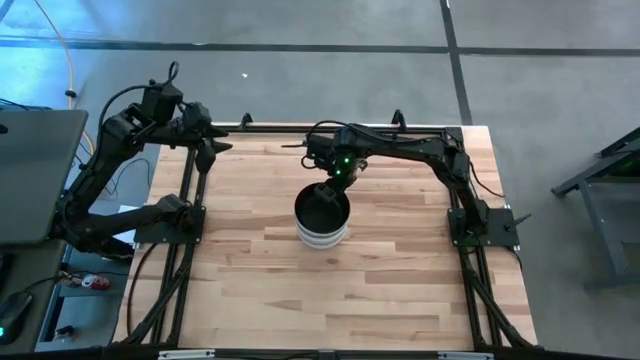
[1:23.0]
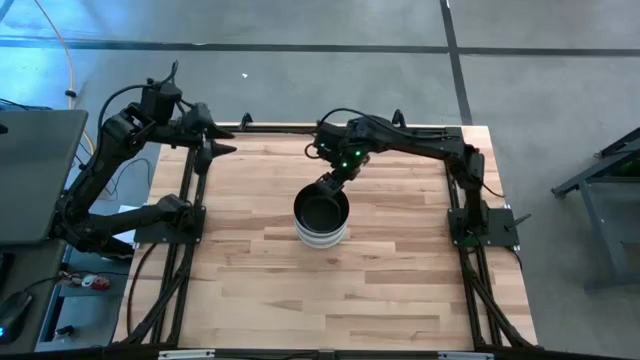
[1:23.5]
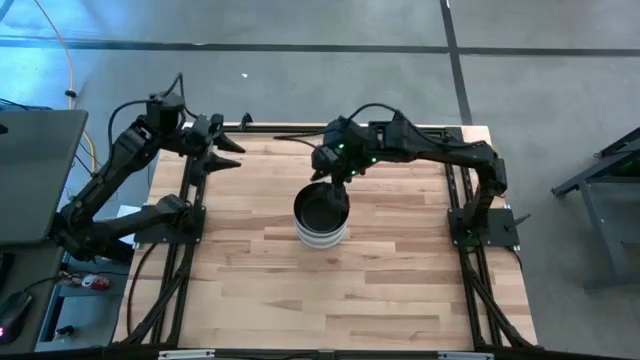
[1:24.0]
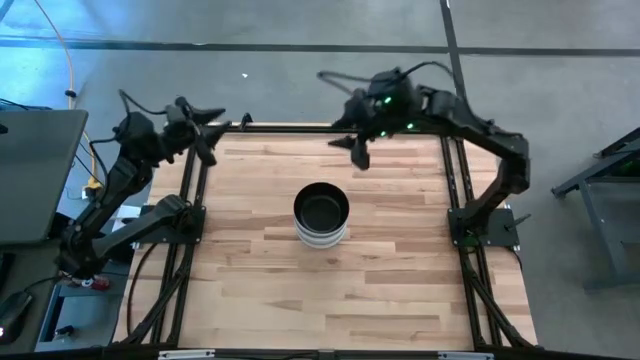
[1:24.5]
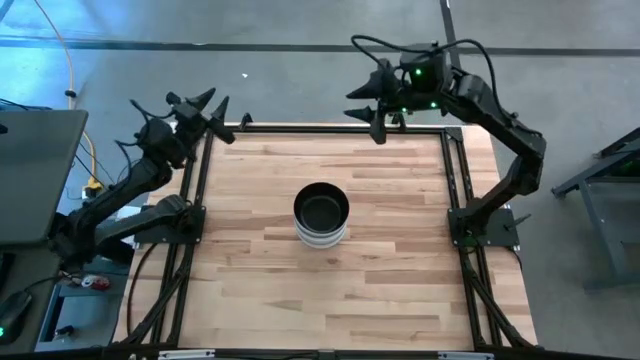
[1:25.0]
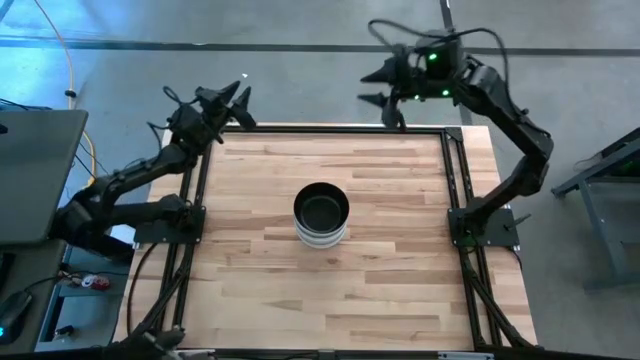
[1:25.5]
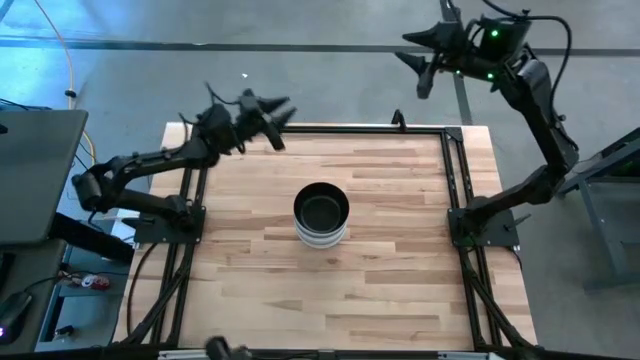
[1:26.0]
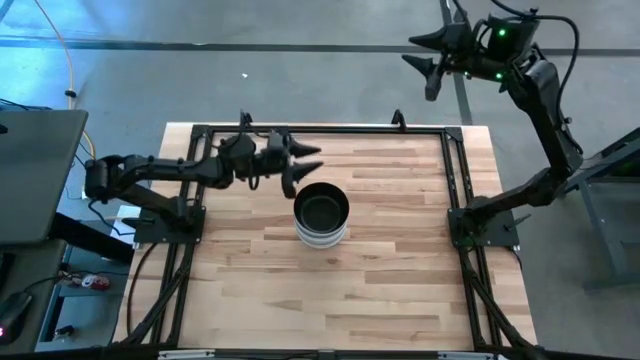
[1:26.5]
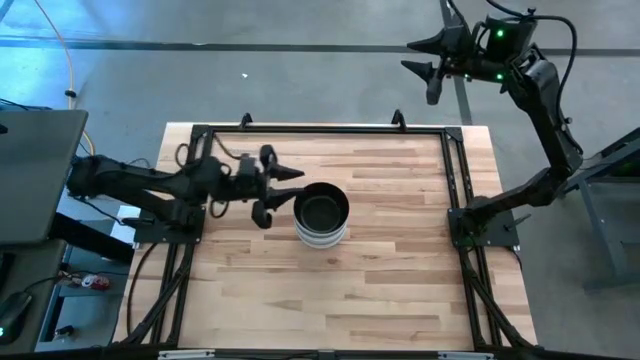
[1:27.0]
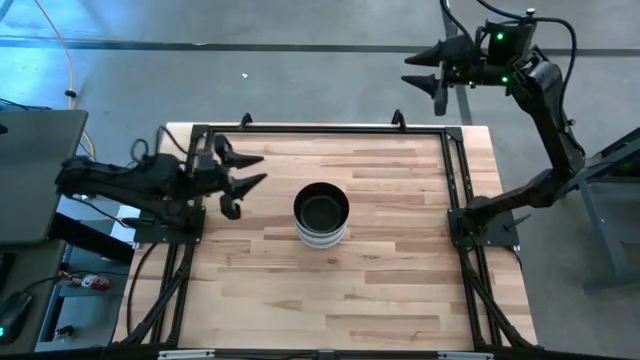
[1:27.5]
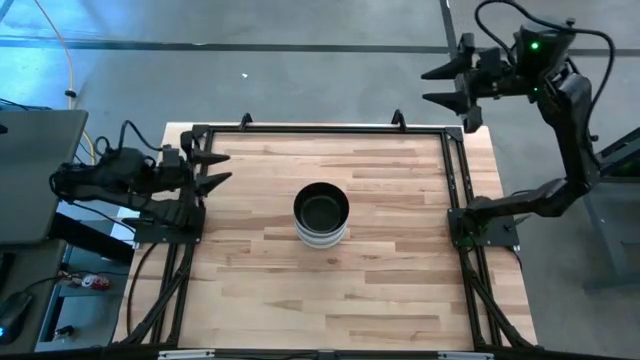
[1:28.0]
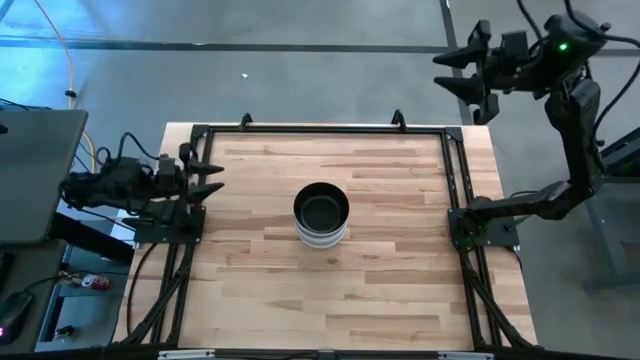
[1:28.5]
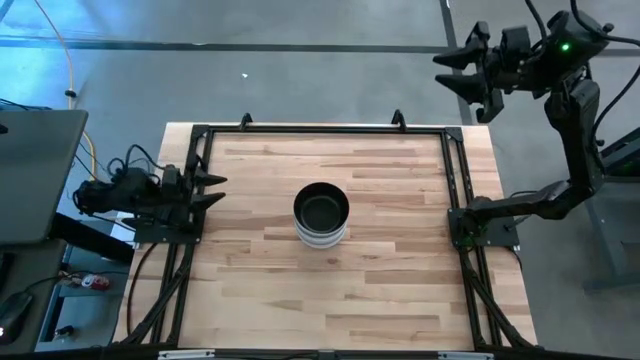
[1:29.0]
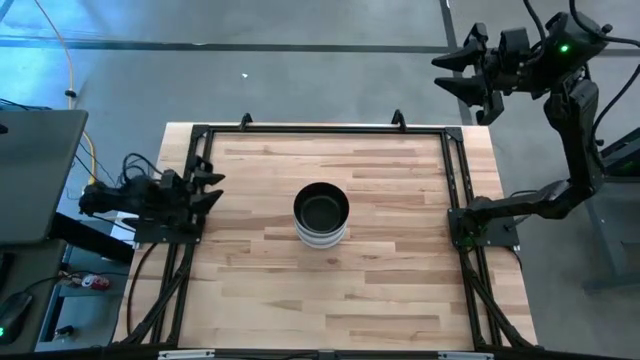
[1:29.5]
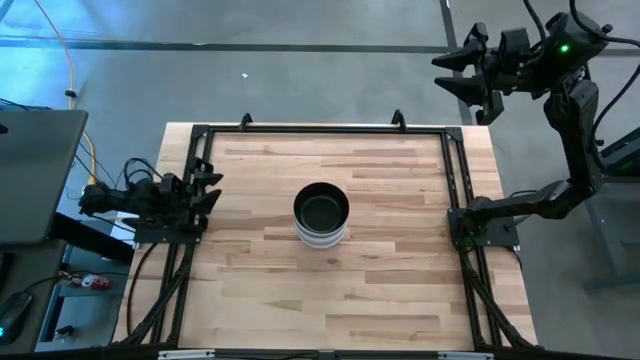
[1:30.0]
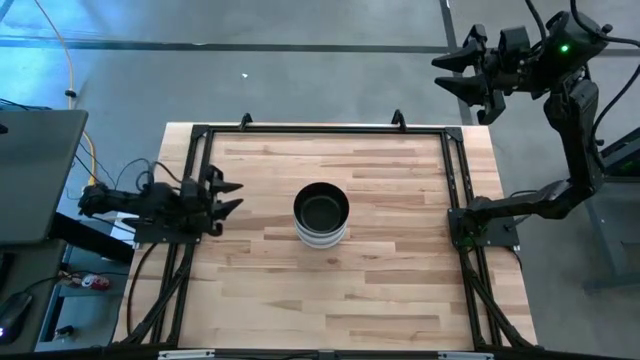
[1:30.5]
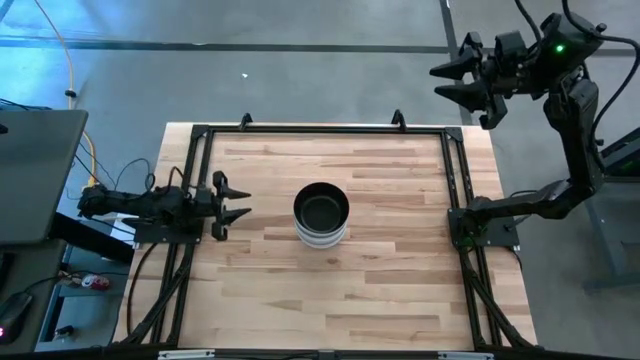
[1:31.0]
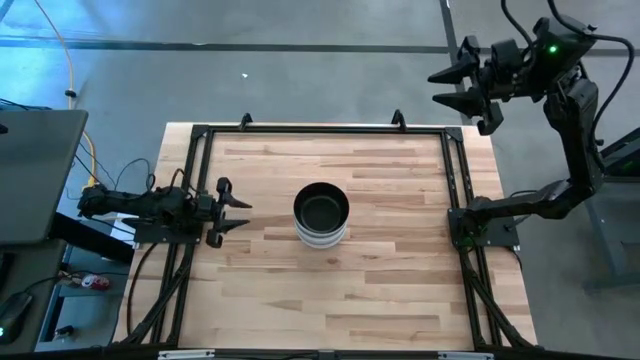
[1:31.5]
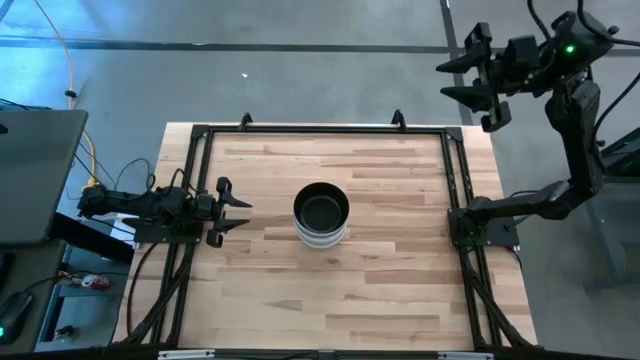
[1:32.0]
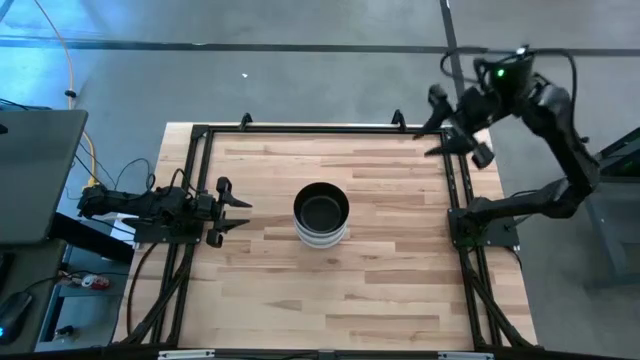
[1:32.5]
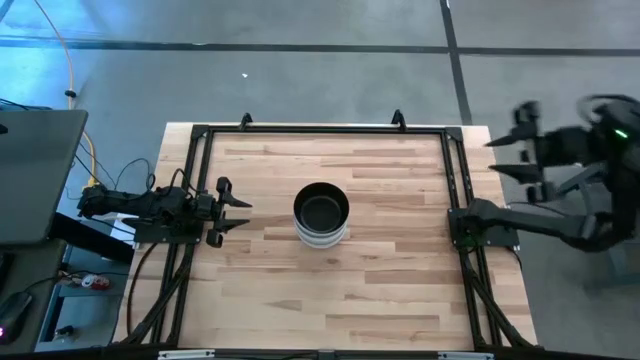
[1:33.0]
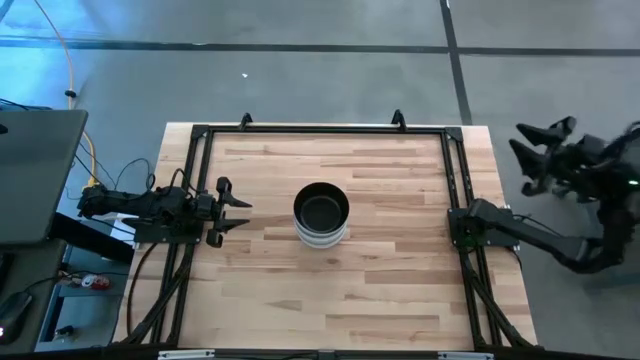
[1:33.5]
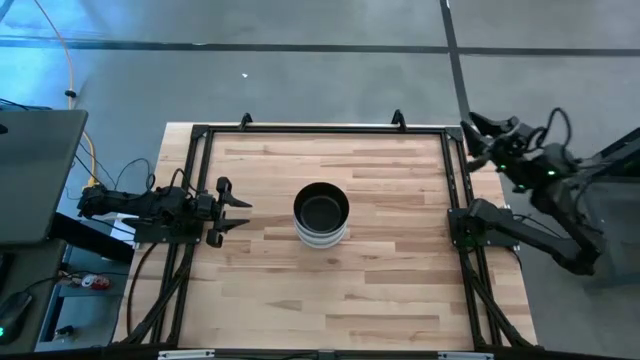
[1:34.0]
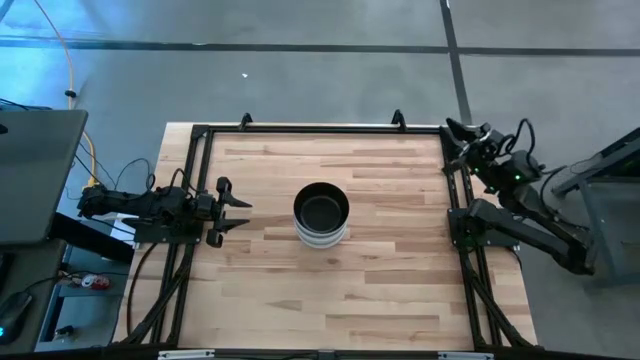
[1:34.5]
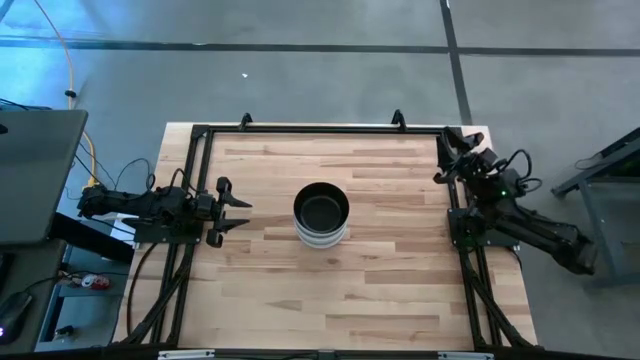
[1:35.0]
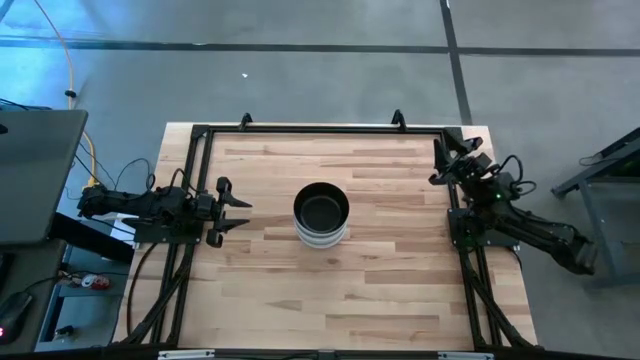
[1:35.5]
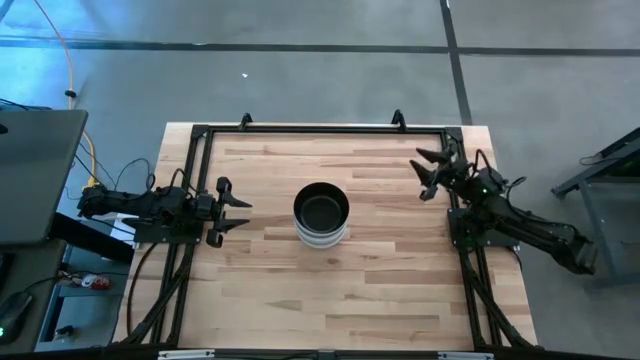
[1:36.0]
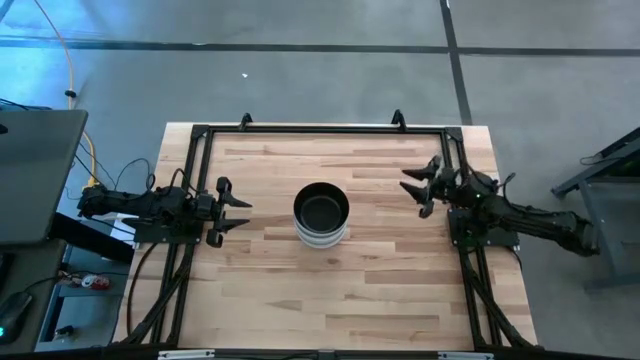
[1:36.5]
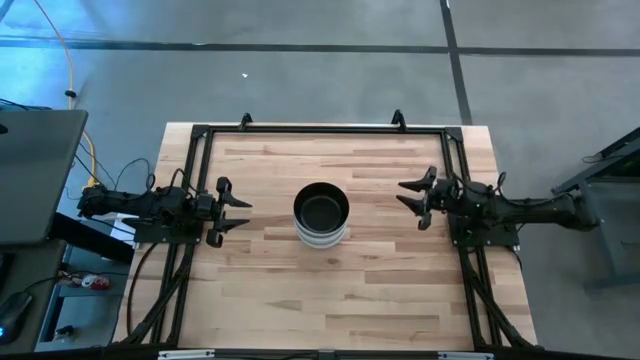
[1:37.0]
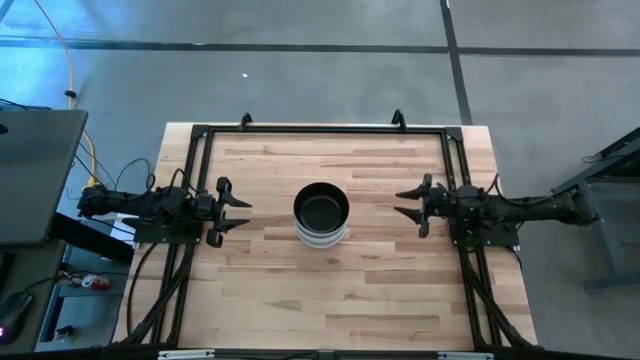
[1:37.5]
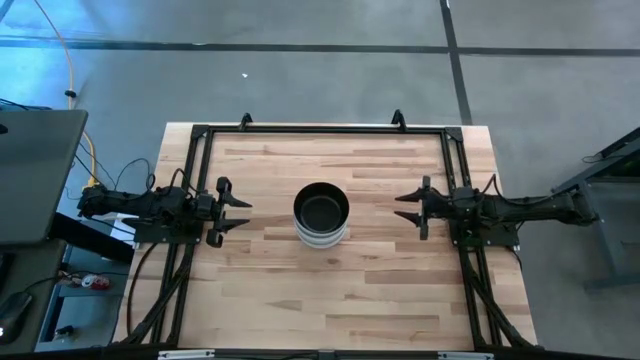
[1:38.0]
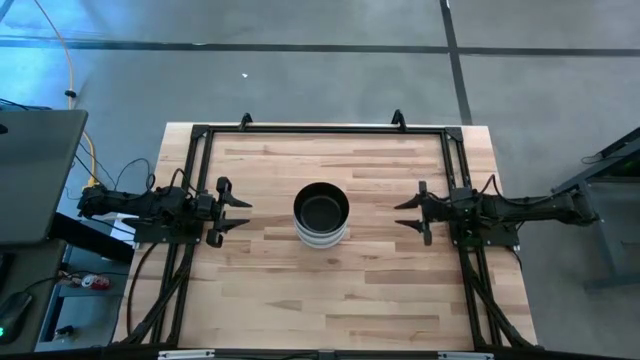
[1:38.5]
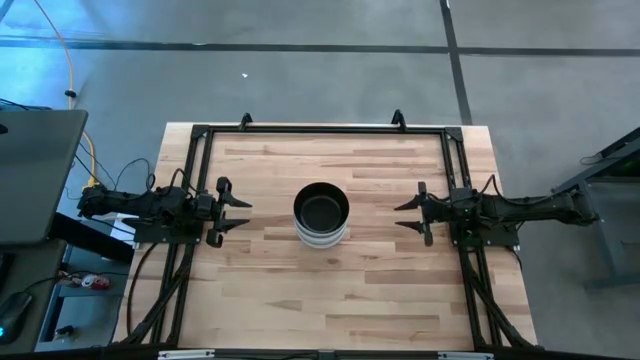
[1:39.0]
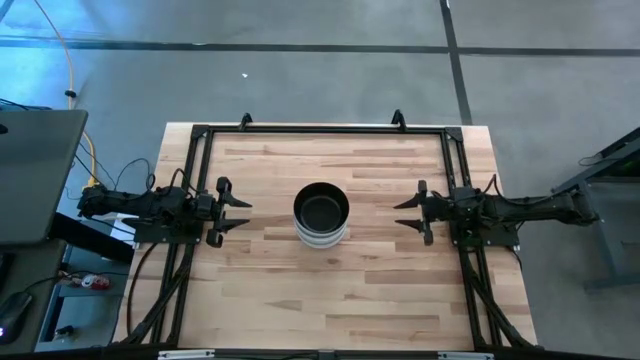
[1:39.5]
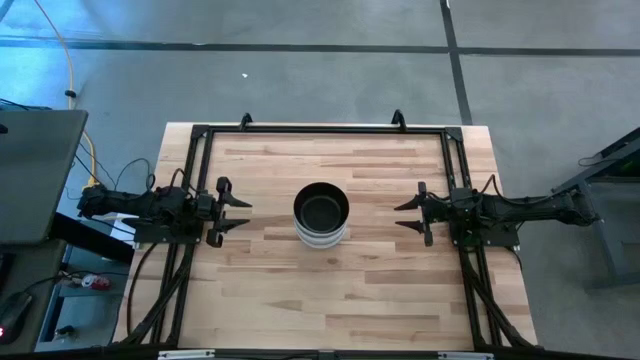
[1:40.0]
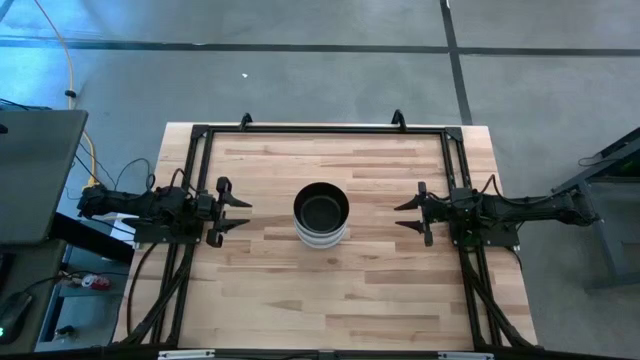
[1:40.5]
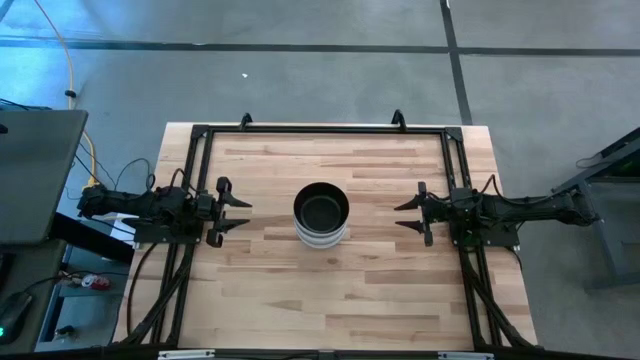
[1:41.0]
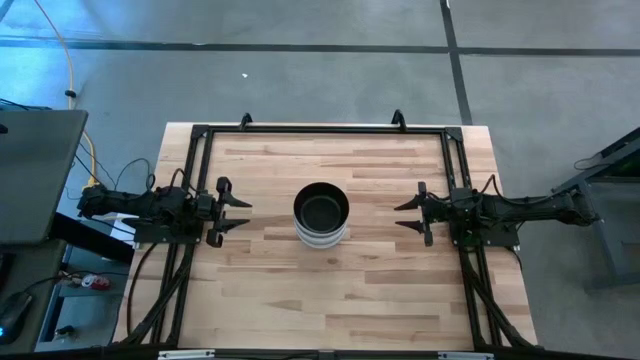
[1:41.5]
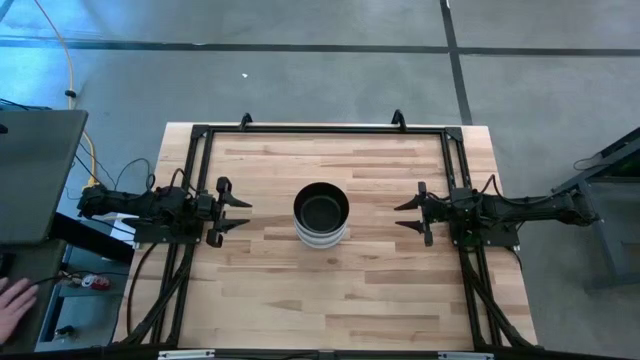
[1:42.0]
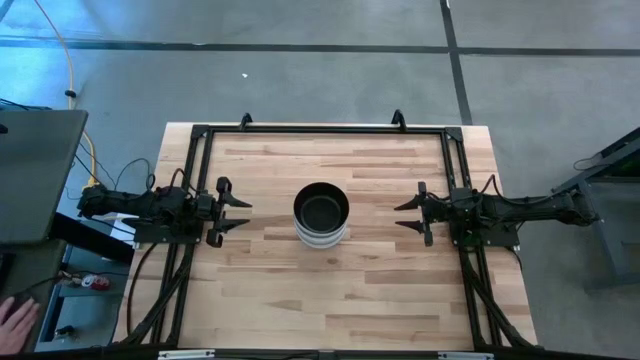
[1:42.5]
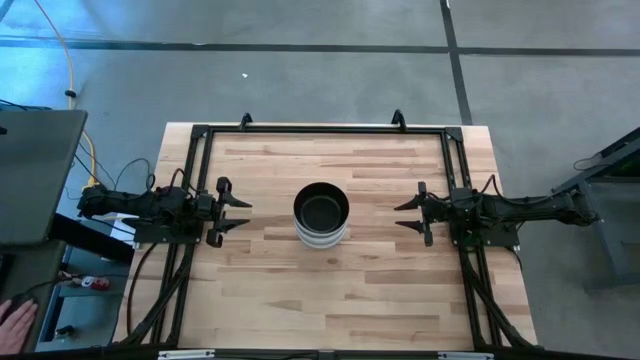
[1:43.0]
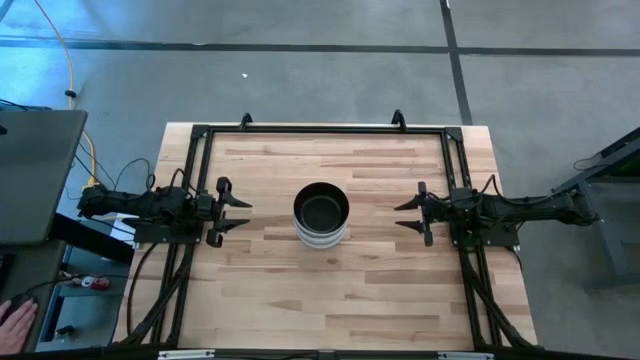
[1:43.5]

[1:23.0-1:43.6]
Task: Nest bowls inside each other
Return to Home Position

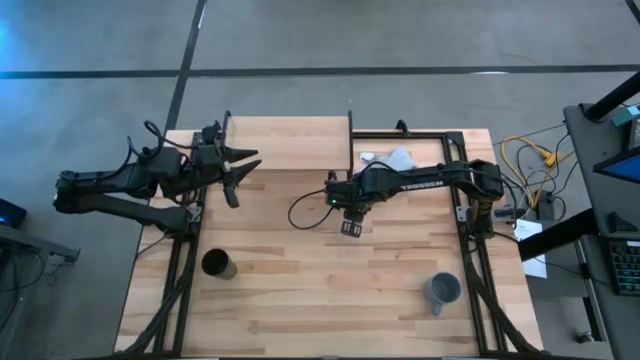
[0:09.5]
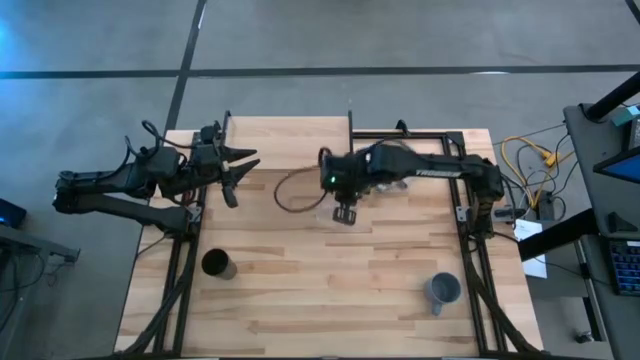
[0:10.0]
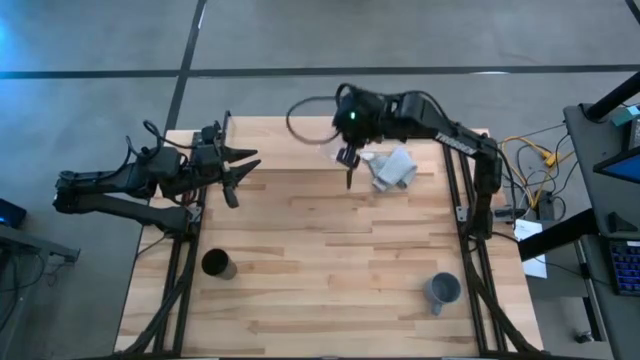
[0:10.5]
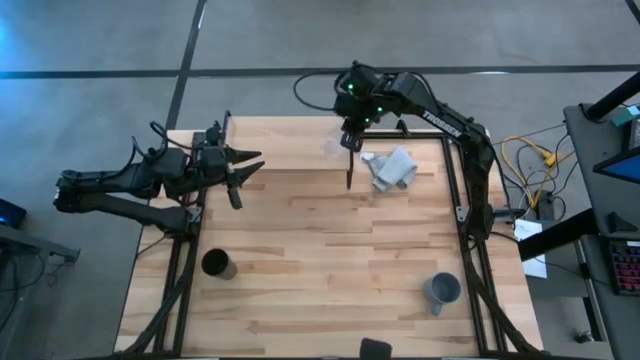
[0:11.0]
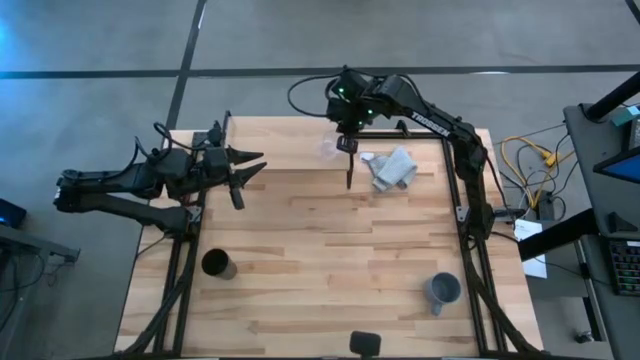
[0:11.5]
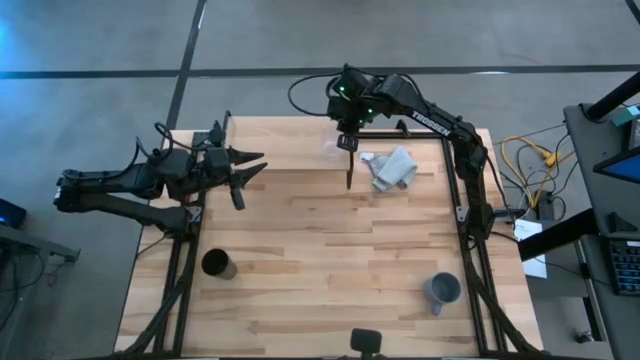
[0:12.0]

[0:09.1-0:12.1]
Task: Stack small to large cups/mugs on shelf
Put the transparent mug on the shelf
